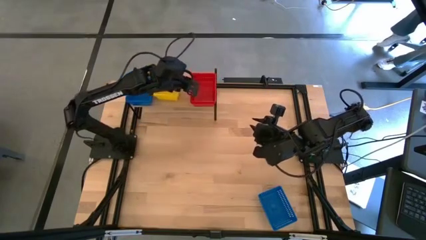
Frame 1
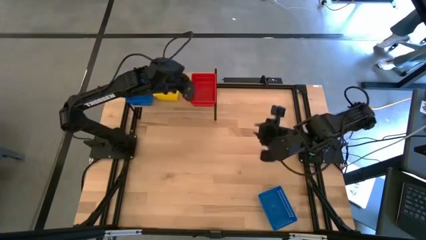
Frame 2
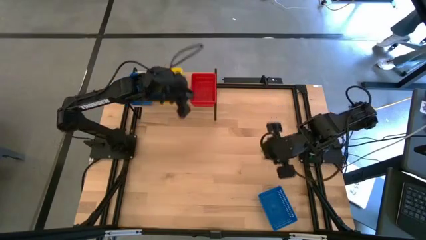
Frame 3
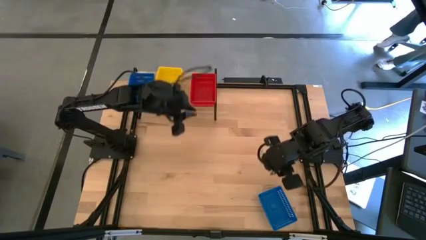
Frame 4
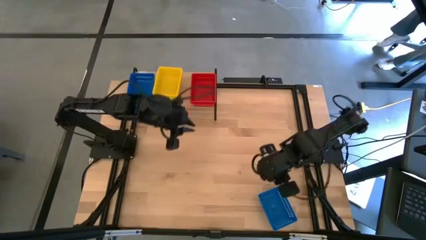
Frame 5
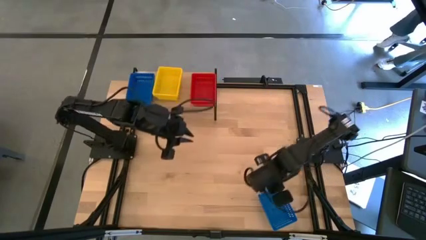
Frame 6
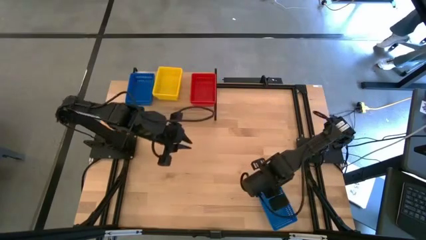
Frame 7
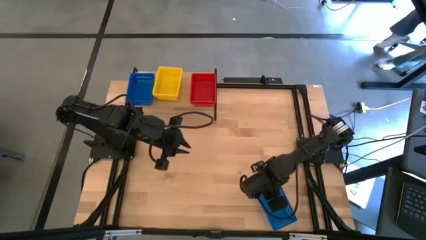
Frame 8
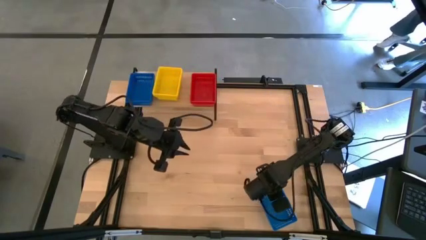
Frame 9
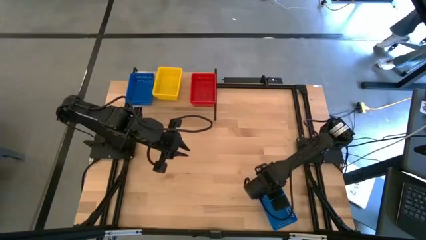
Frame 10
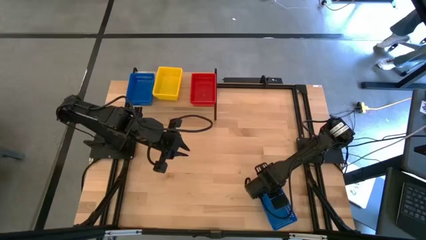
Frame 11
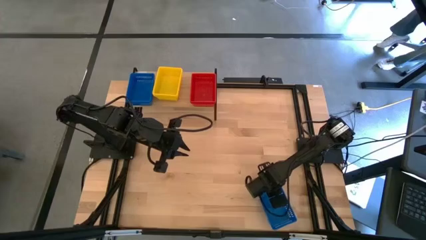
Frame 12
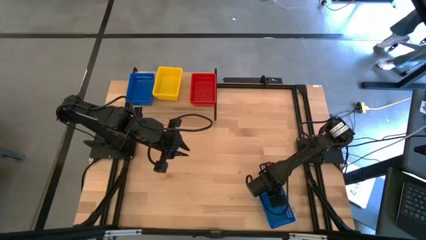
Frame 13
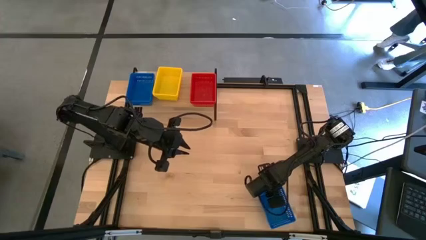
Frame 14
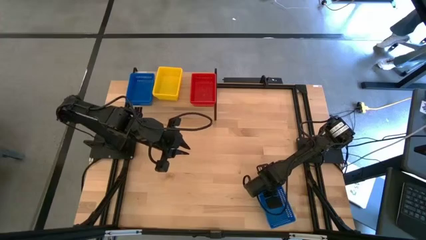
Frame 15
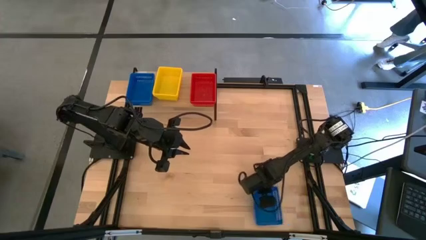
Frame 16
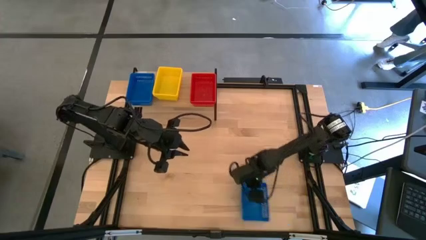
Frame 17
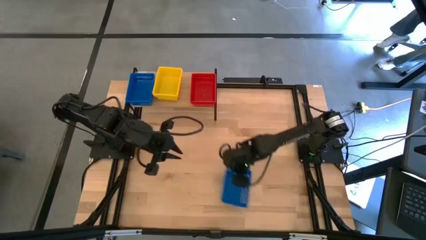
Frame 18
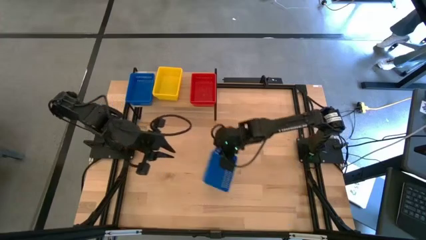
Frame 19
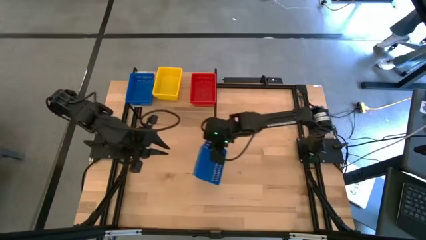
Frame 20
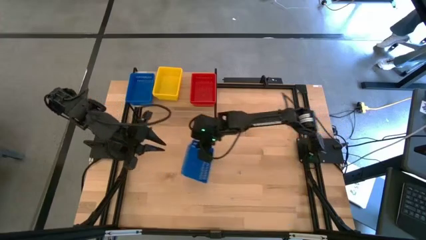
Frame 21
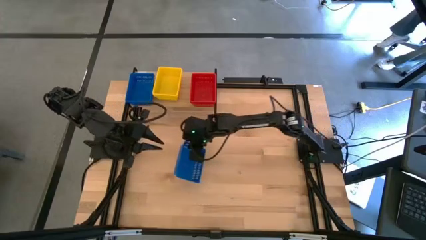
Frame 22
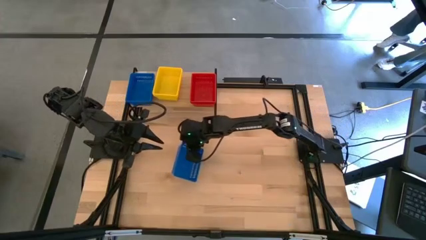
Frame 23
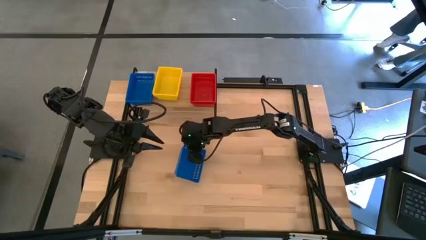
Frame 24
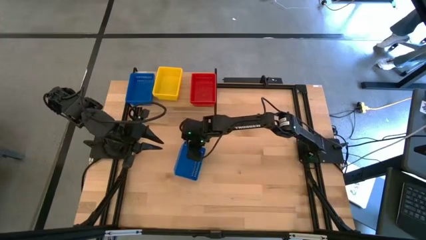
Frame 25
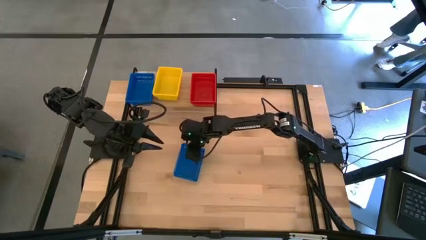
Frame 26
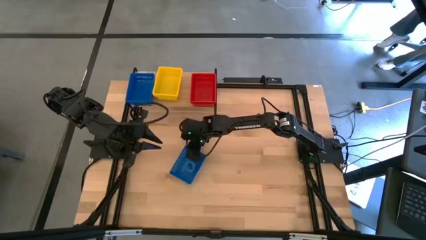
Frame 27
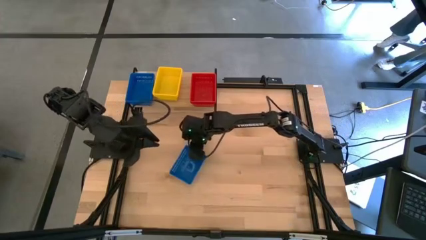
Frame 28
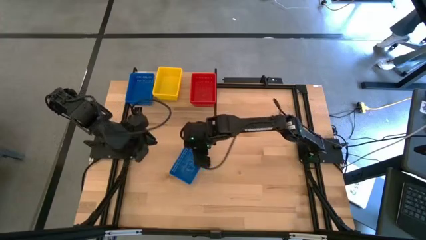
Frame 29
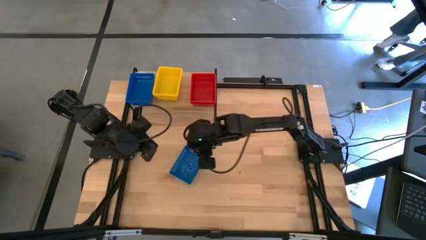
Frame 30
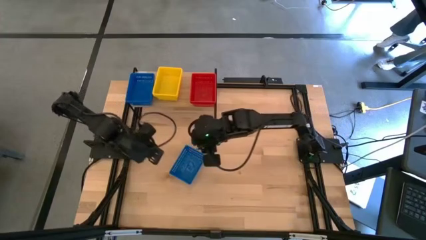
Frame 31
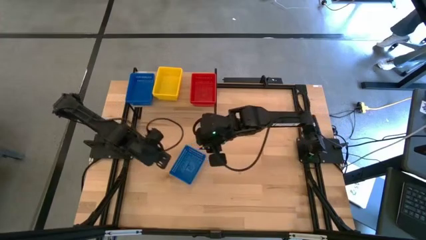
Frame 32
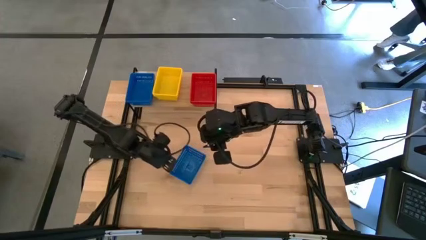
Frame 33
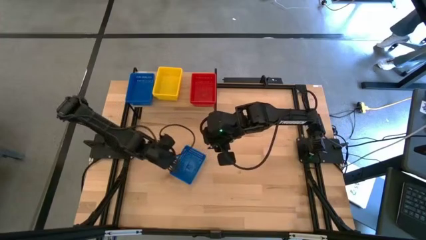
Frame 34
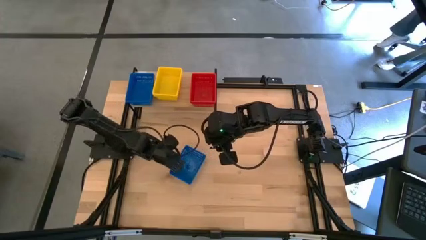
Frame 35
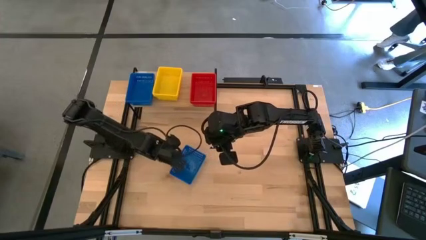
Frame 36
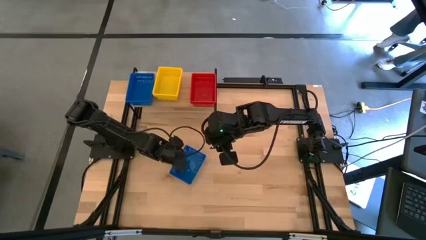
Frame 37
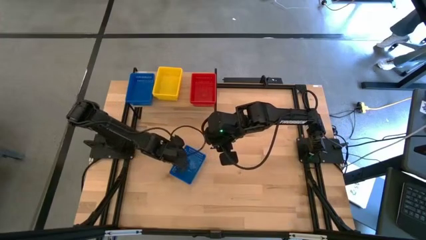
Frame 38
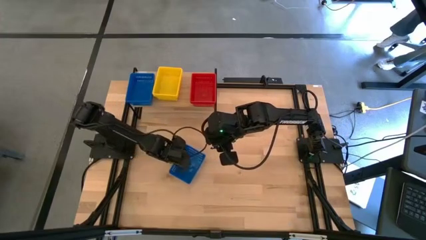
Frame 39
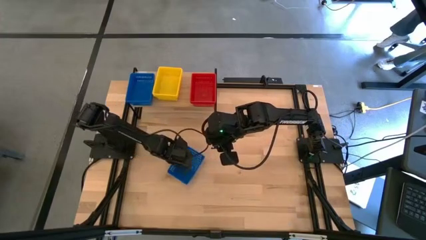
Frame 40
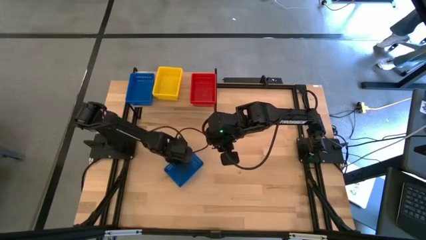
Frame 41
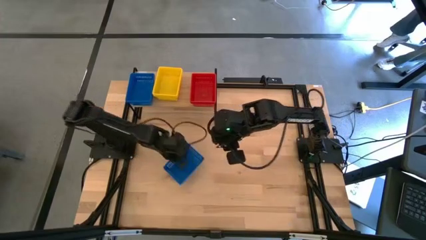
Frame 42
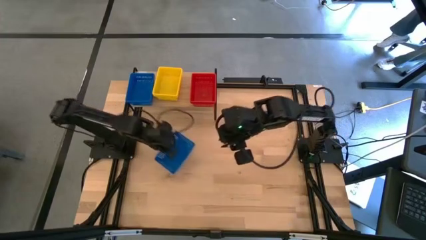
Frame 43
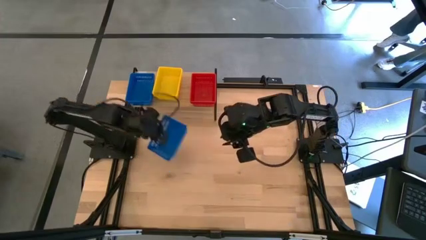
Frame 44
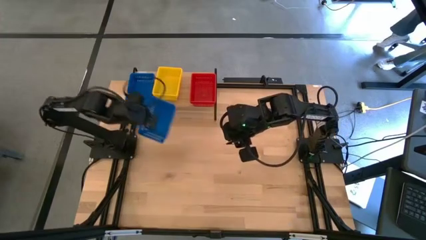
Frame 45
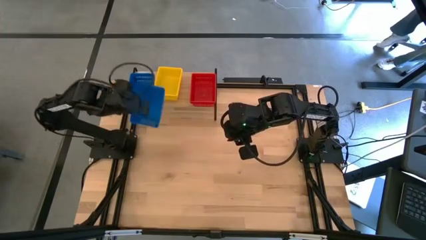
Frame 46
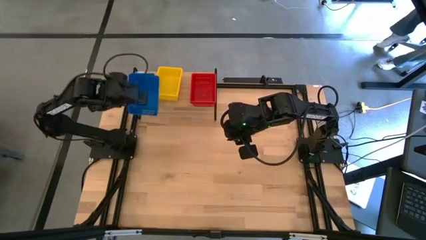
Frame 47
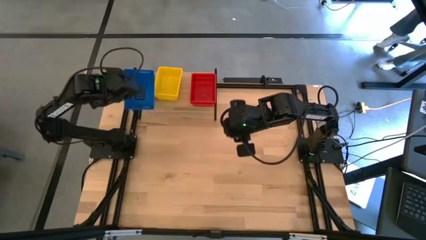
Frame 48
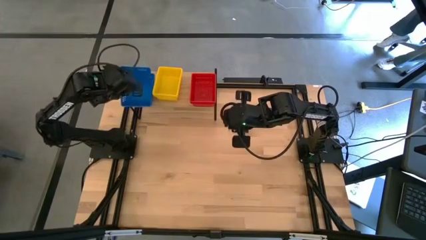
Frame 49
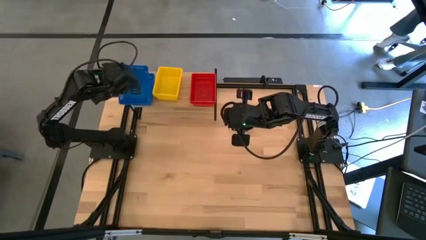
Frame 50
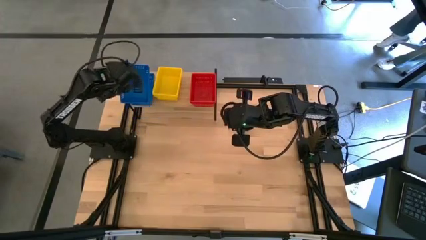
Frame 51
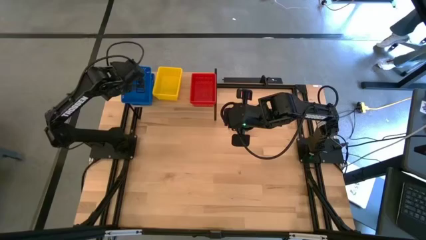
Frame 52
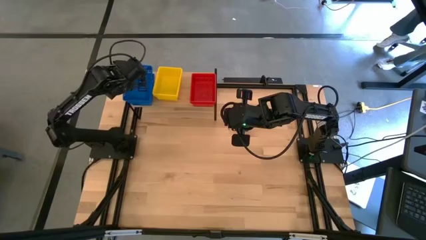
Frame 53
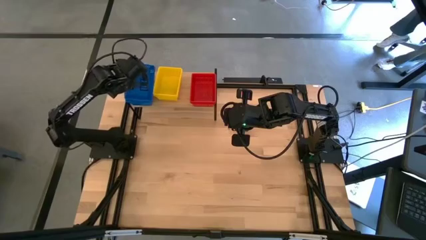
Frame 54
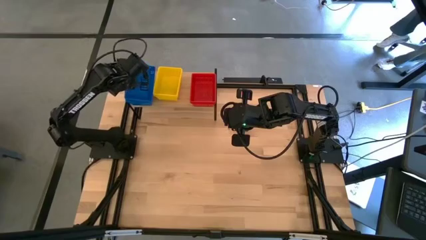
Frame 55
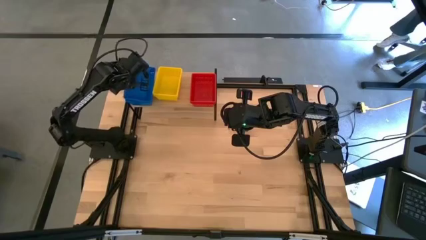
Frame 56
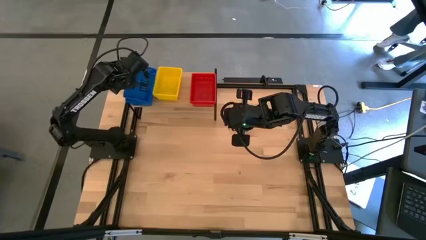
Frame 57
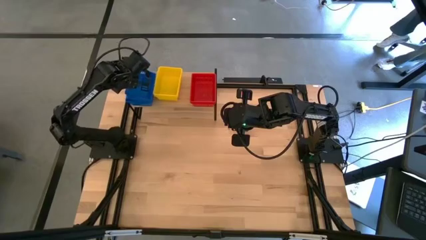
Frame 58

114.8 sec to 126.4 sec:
Task: Stack baskets on shelf by color
Stack the blue bin on top of the blue bins on the shelf
